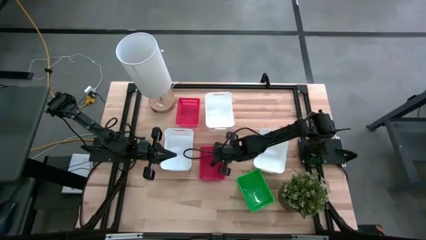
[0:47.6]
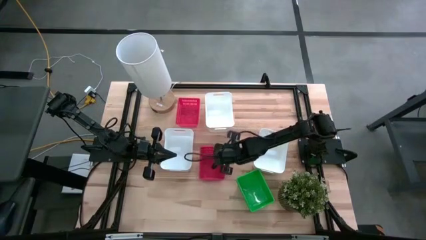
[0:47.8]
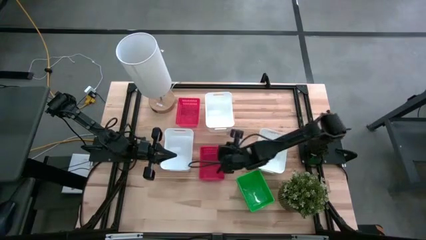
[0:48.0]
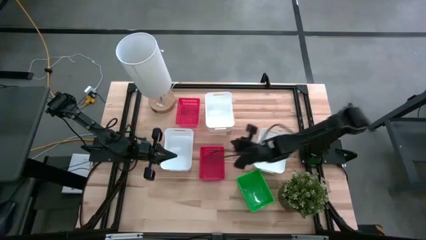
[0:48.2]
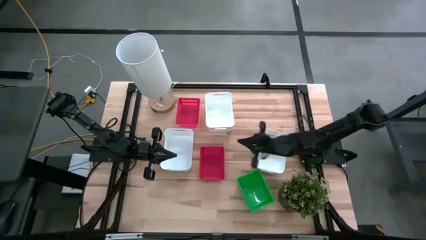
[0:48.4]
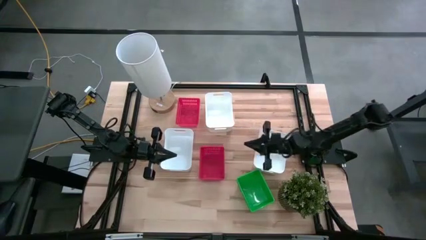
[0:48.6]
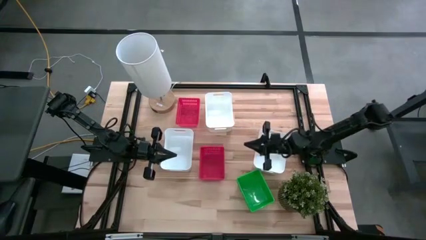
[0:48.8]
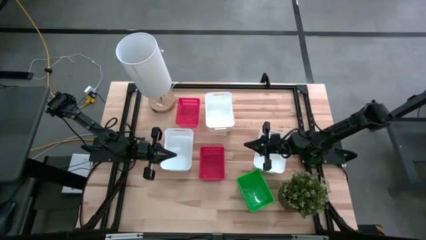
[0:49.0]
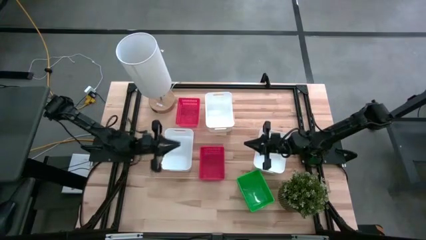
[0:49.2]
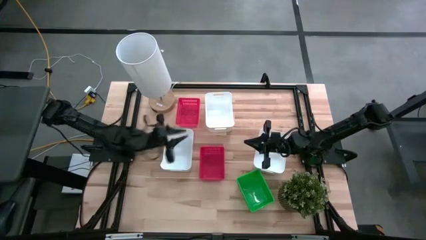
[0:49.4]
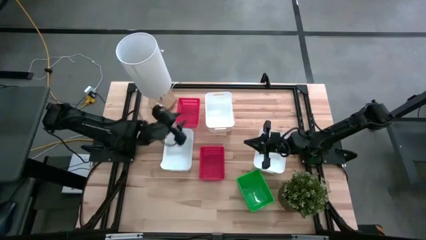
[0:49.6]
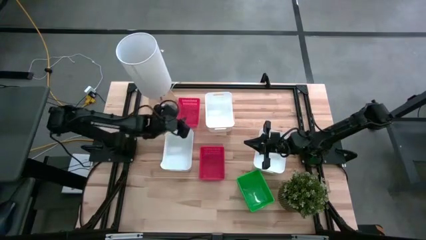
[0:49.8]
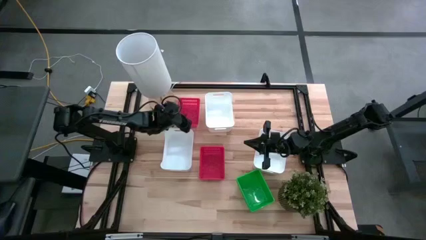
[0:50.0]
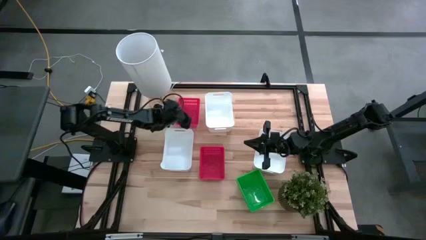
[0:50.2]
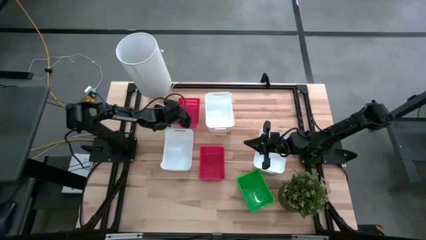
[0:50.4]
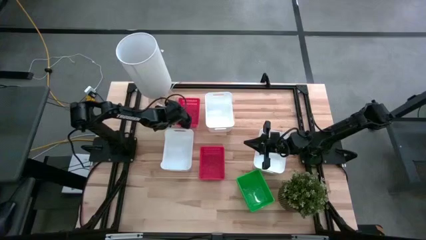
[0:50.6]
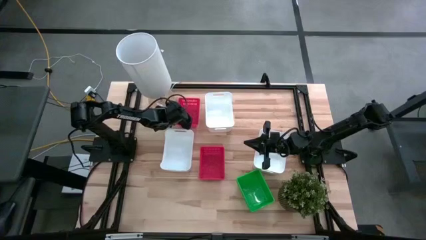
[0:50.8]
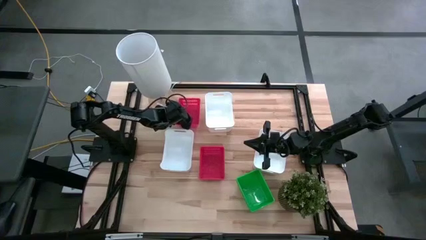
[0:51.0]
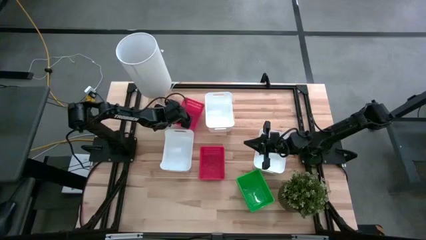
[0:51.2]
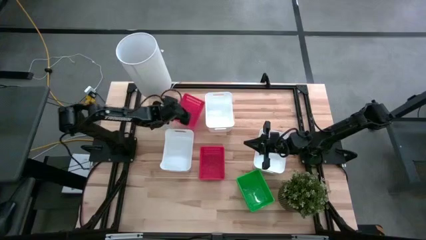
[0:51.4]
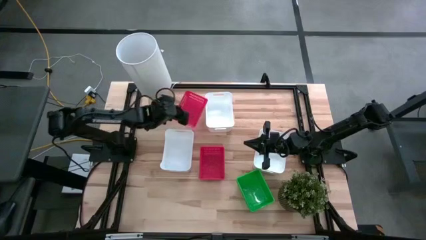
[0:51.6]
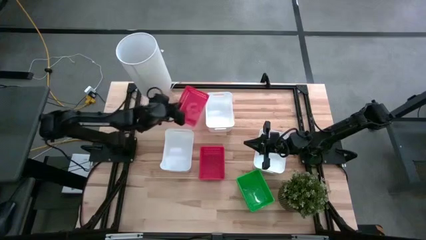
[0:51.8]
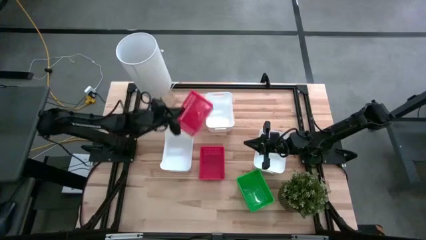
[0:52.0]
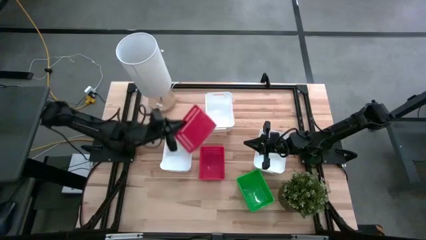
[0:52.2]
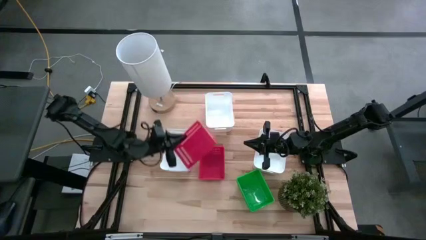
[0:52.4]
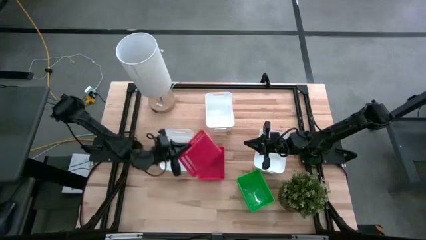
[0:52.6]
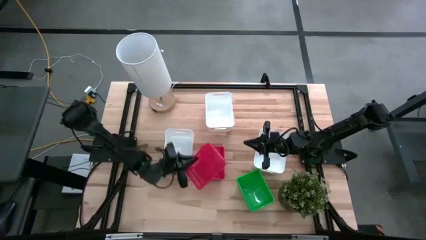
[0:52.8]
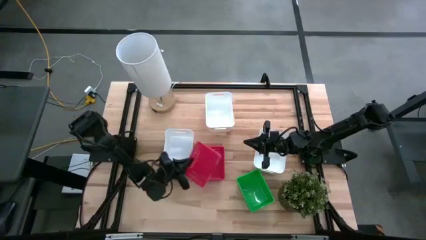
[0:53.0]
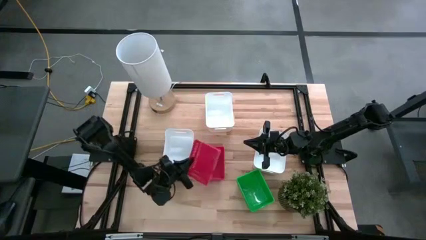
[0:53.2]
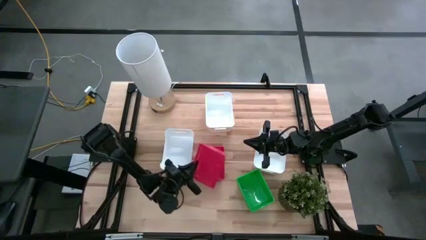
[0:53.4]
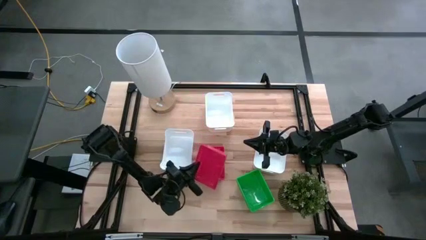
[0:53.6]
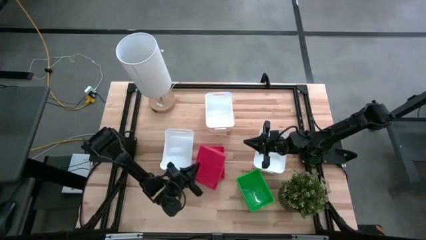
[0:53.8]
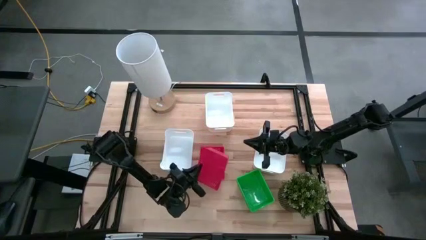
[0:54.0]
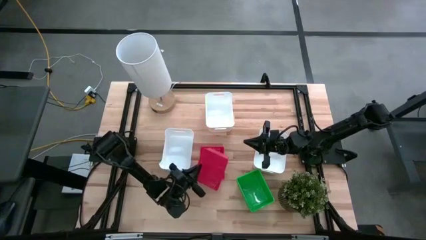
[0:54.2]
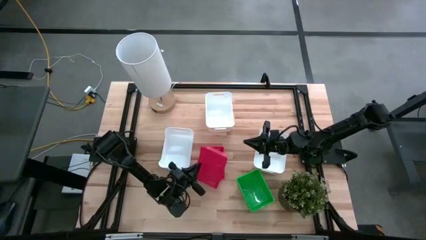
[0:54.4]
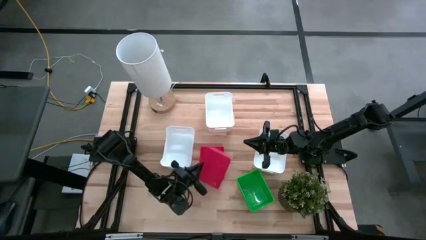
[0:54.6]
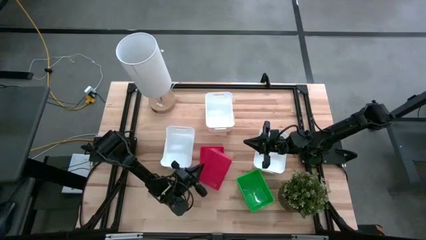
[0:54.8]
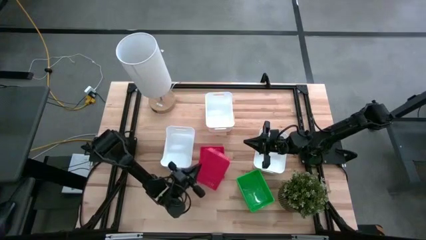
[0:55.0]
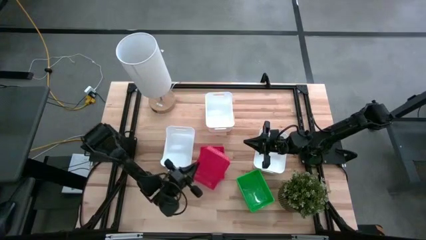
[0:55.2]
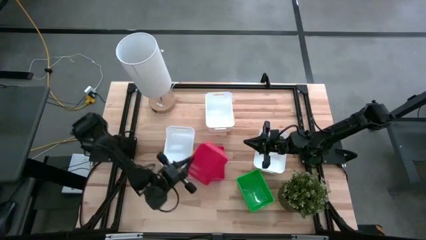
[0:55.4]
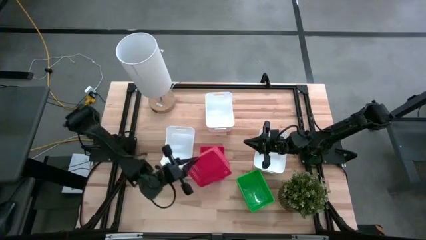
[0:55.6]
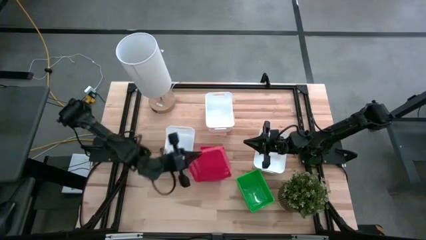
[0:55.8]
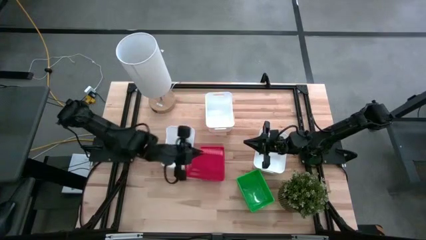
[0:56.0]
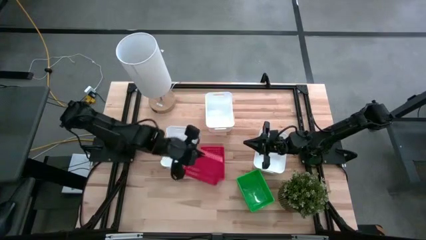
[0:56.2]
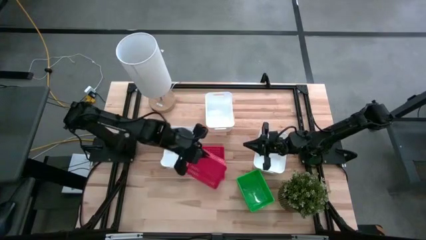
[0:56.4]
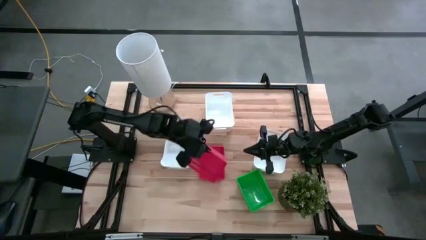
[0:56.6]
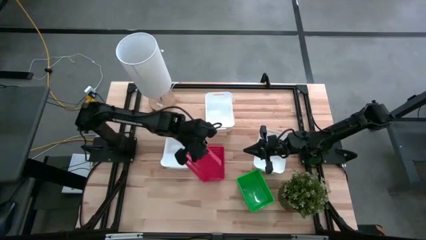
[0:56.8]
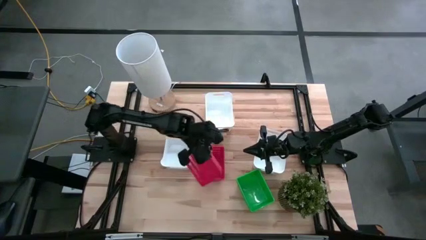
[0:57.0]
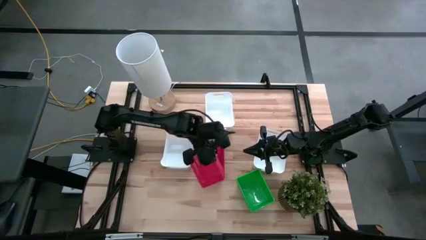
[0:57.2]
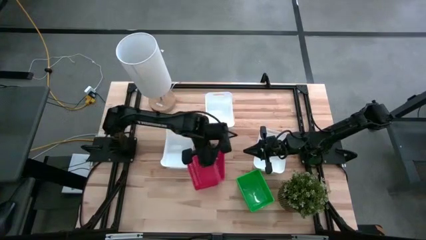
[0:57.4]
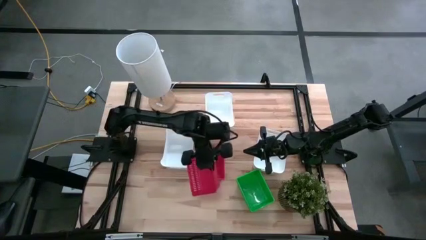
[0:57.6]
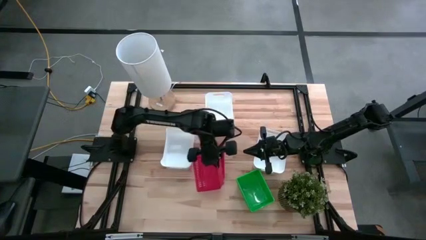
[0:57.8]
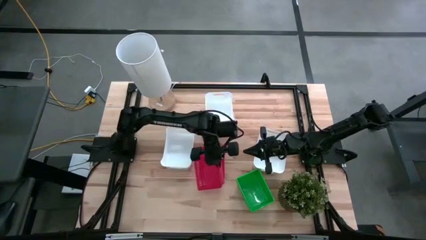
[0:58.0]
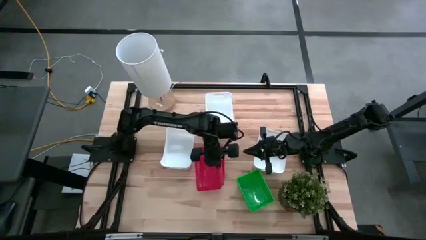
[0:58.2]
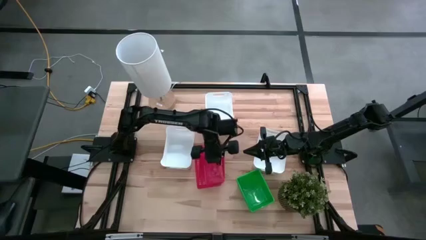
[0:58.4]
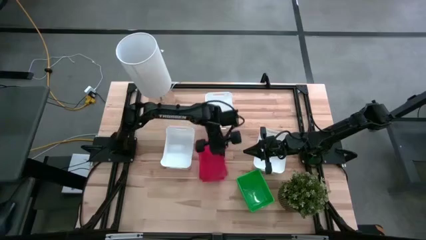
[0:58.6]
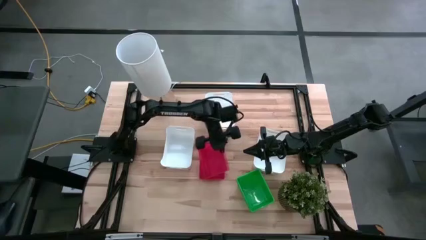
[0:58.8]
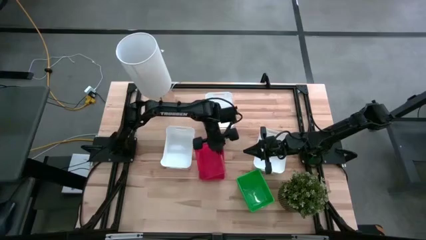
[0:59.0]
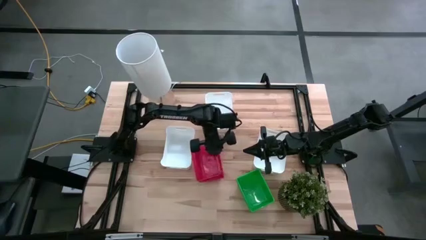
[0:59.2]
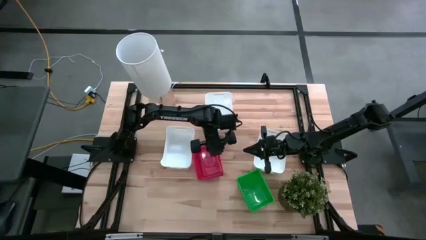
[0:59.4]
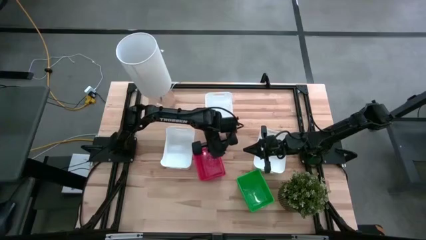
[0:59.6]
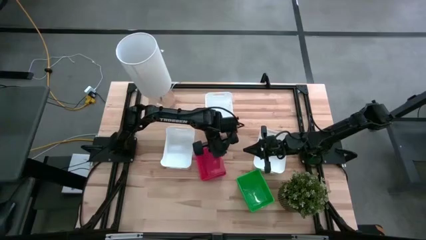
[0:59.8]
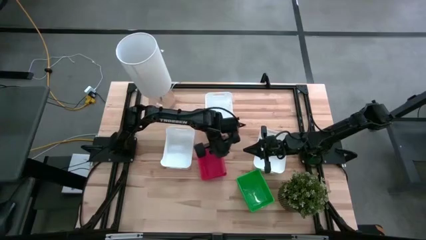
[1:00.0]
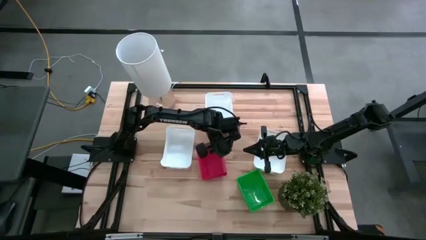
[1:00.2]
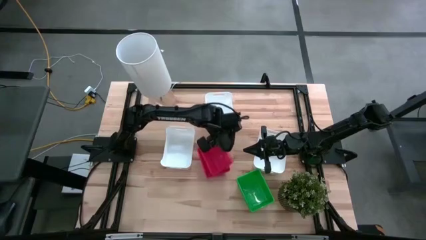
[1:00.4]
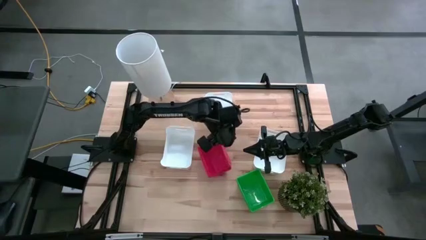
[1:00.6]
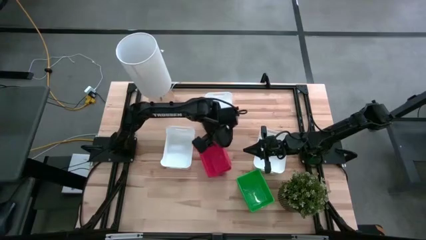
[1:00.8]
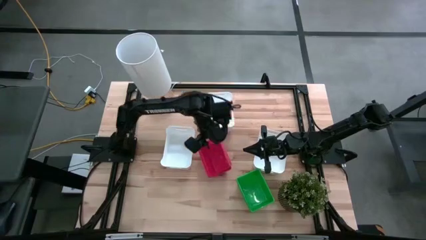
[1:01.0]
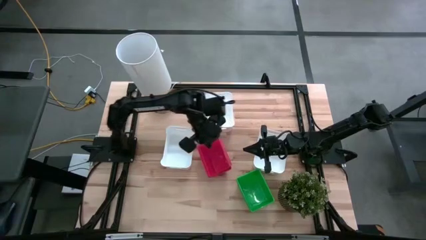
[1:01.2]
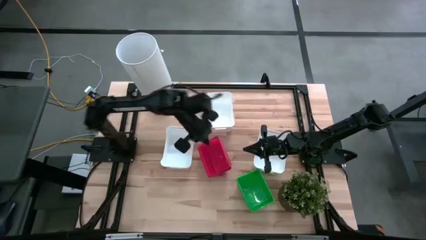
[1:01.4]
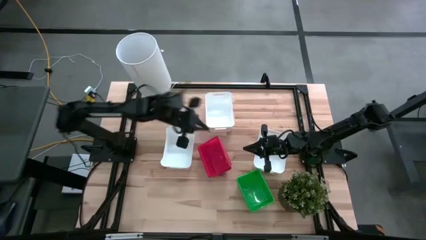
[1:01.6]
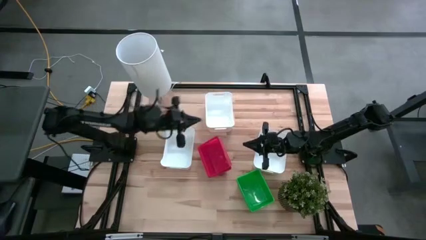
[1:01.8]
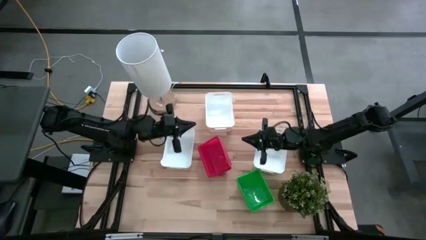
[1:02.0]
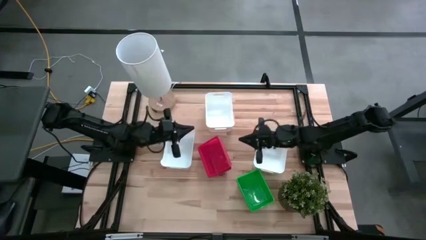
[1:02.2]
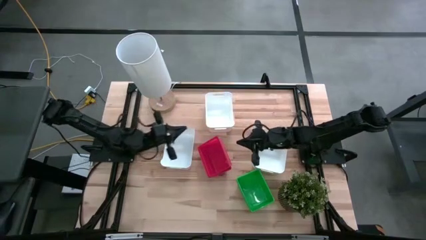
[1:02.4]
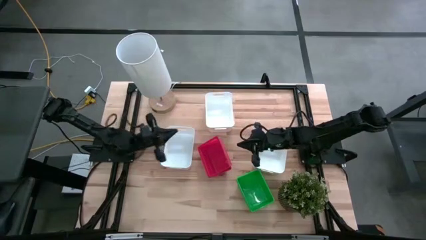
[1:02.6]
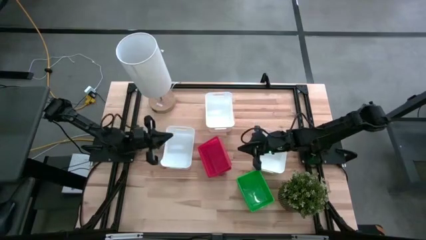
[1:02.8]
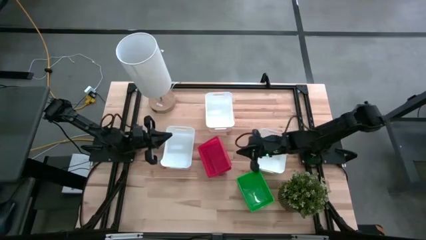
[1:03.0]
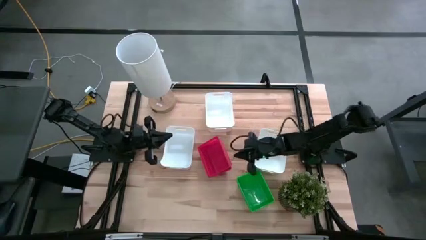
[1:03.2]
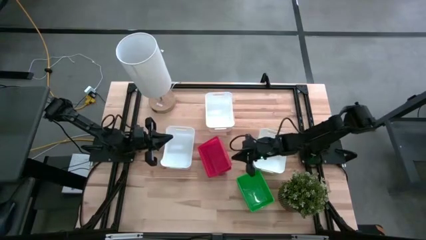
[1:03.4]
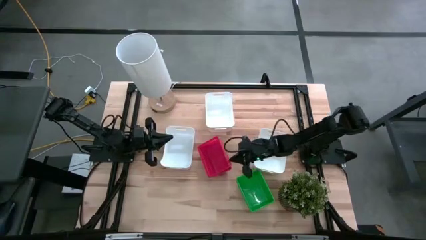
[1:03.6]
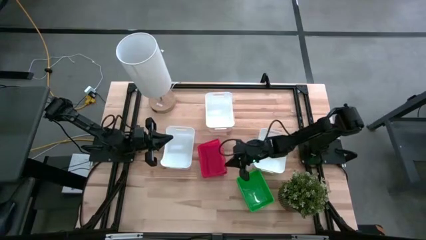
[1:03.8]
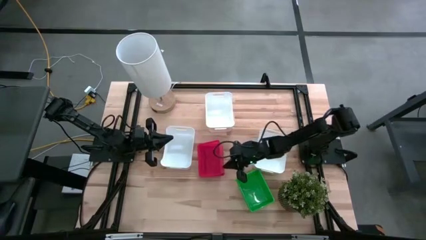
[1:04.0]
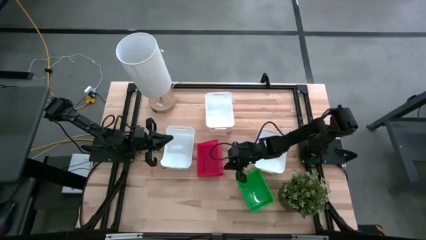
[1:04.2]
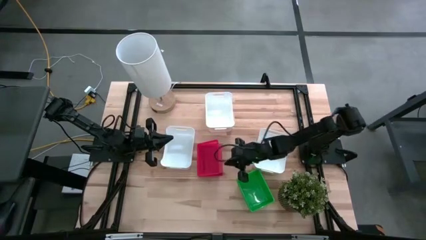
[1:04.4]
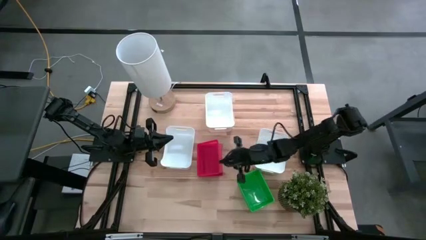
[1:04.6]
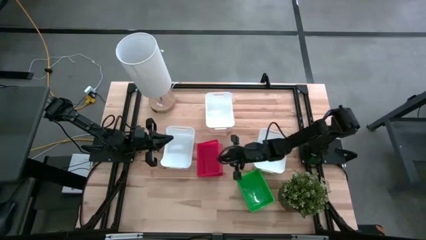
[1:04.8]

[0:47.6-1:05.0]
Stack the top red bin on top of the stacked red bins
